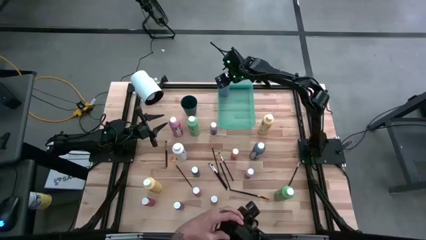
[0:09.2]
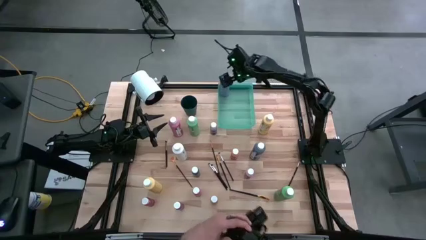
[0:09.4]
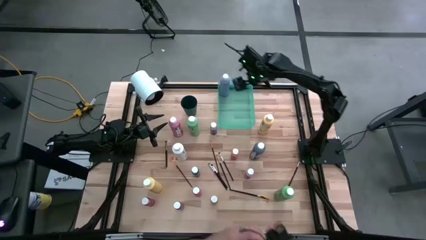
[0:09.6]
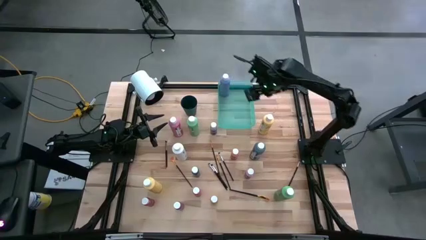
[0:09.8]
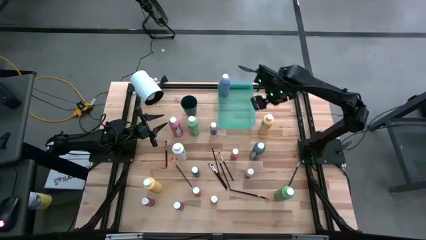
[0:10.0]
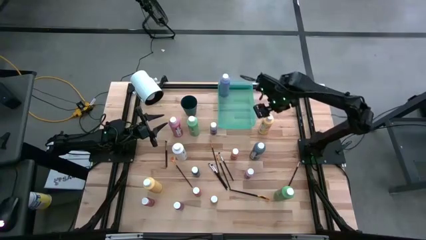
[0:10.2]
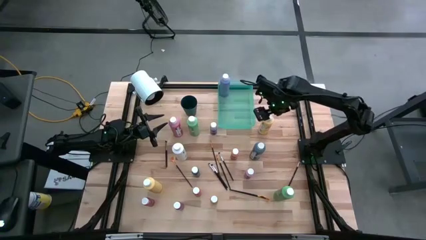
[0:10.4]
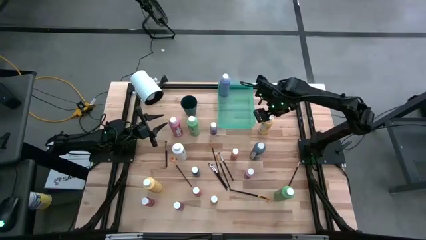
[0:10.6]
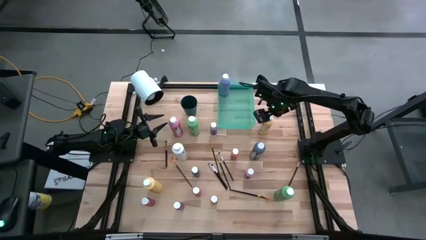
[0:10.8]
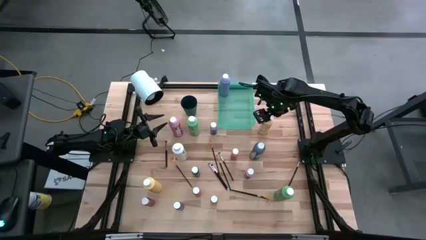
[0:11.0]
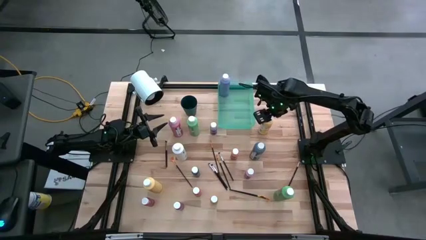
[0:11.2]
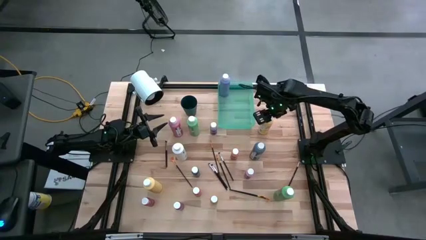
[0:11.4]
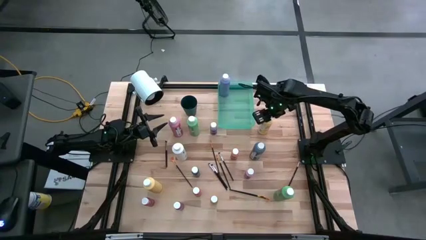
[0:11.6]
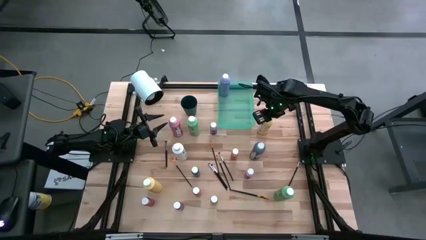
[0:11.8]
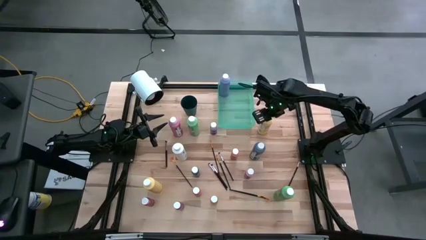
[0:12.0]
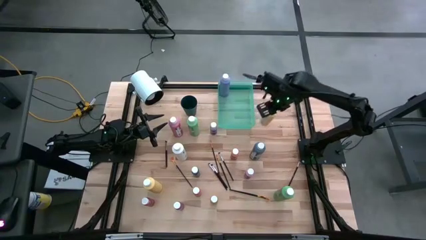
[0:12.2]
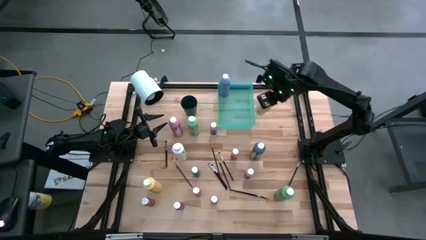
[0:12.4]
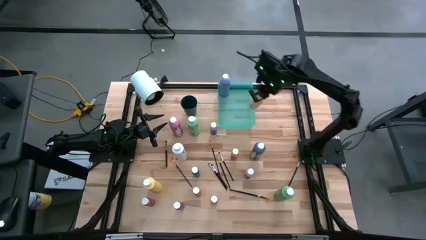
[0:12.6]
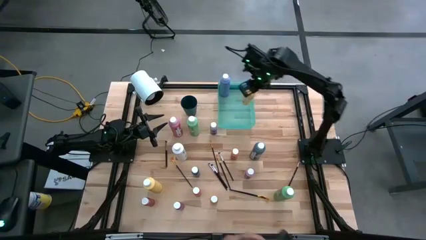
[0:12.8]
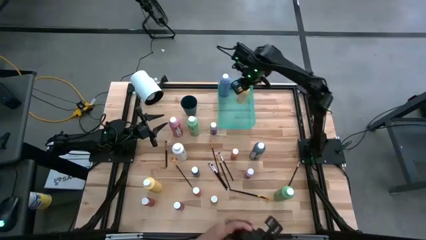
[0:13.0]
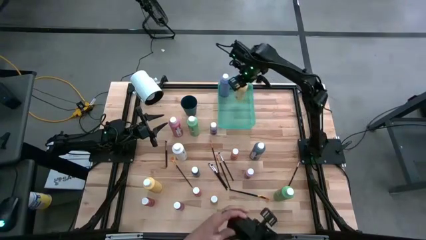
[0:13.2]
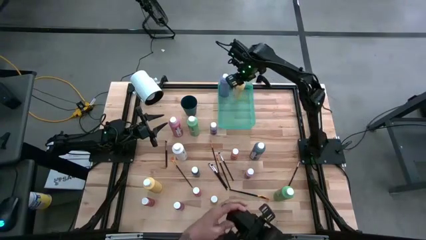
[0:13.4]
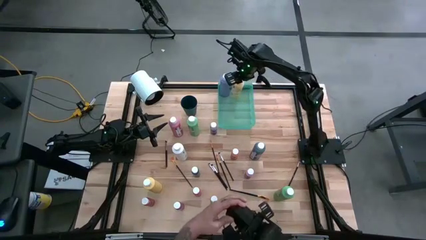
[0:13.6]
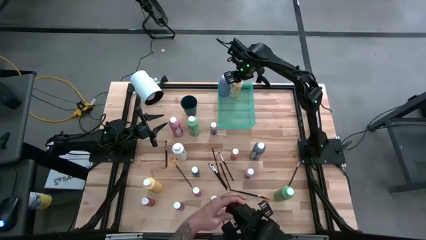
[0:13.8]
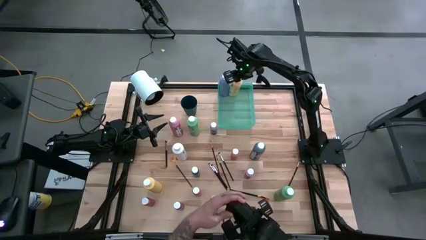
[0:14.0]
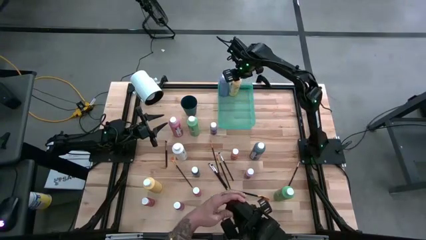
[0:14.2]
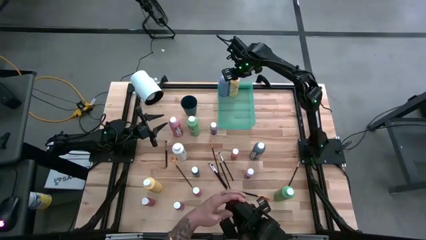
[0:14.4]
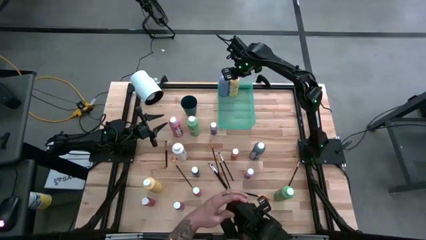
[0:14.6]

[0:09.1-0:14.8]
Task: Pick & Place Paint Supplies
Put the top yellow big paint bottle into the green bin

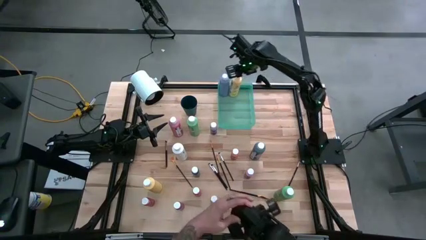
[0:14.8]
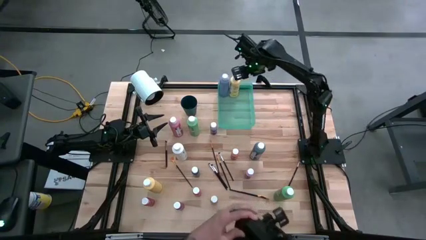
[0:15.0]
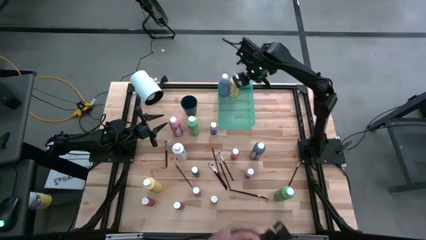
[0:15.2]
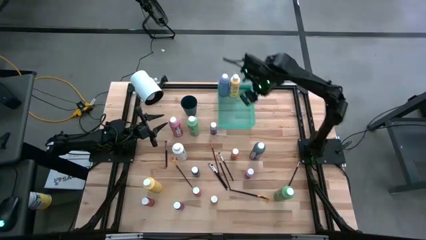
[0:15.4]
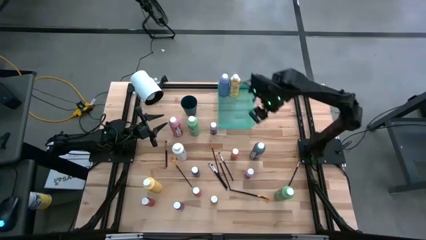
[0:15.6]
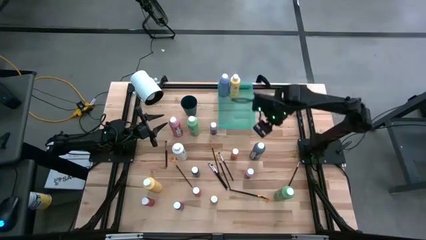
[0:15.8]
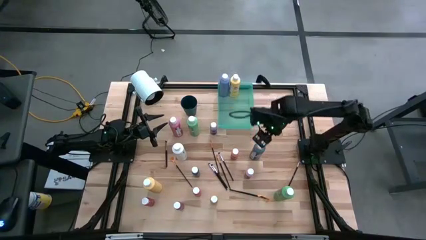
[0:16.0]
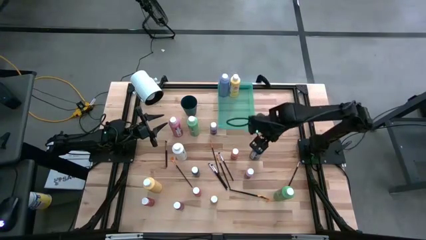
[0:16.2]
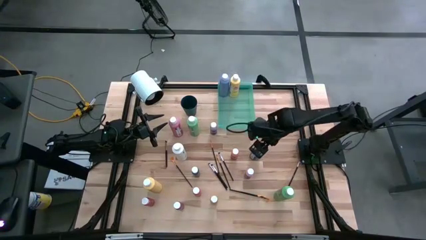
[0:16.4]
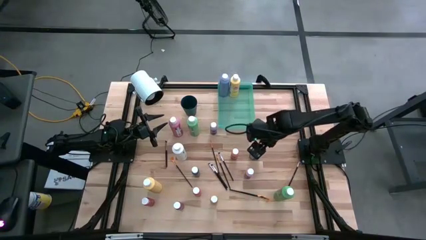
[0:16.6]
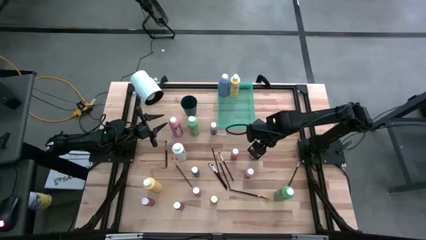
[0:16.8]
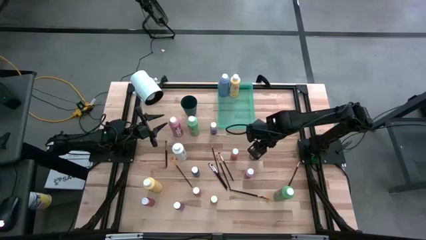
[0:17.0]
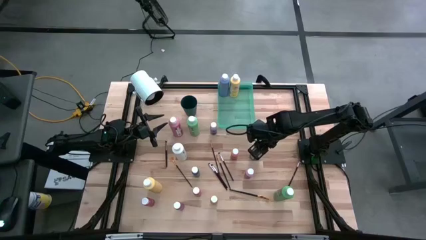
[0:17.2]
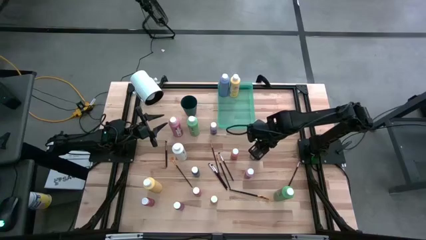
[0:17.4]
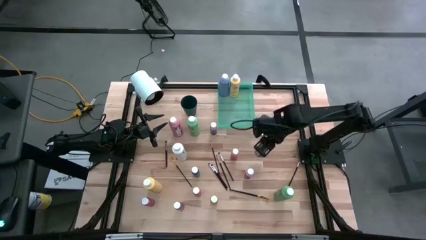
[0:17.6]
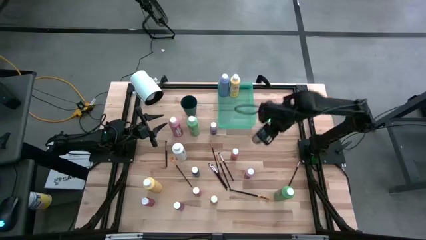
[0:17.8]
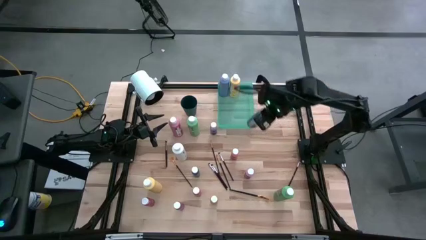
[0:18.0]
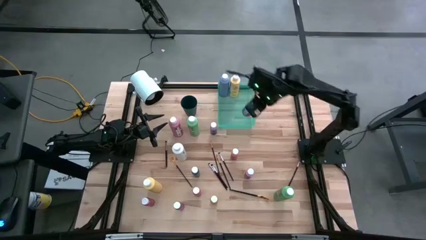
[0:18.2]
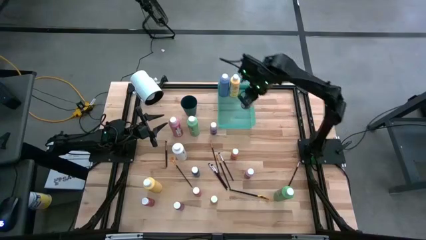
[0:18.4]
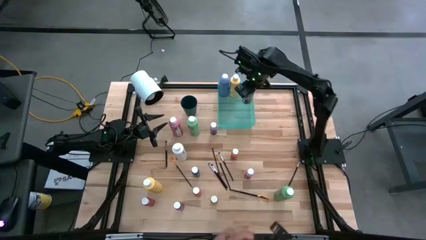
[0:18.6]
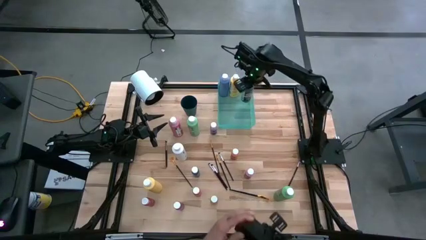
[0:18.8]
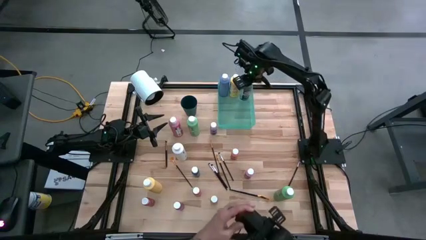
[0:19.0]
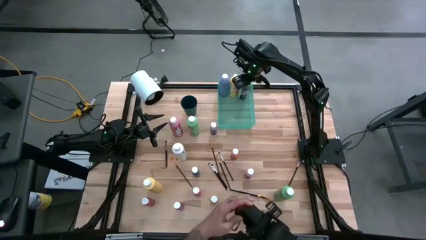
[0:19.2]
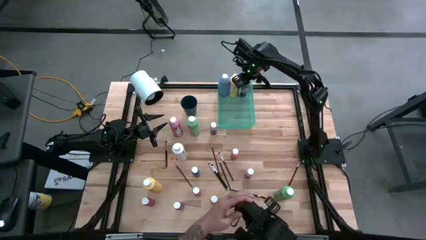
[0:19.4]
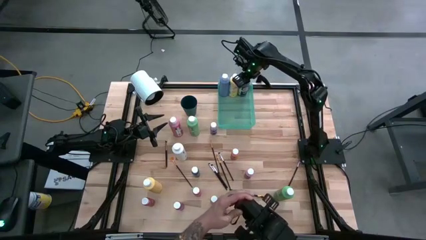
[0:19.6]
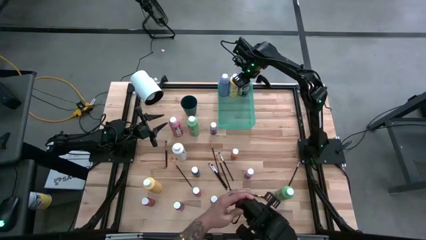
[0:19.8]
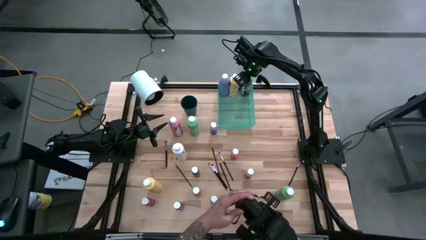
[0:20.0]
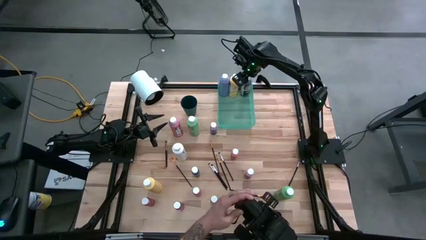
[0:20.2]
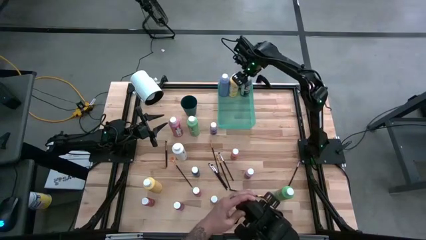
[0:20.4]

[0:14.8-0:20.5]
Put the blue big paint bottle into the green bin

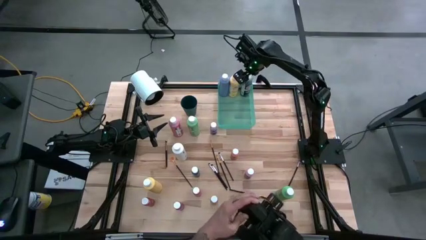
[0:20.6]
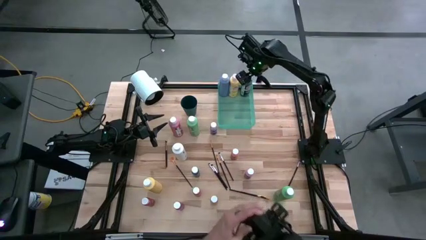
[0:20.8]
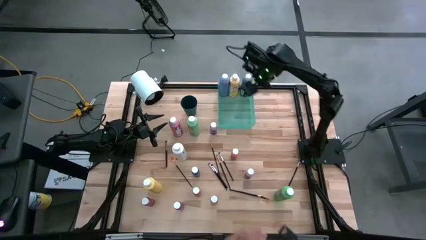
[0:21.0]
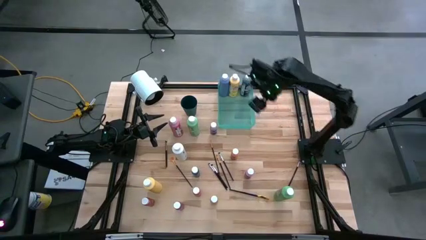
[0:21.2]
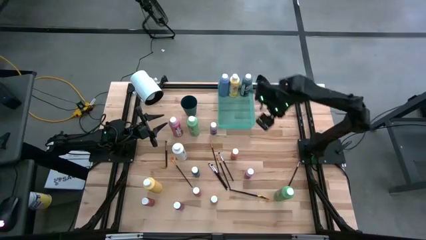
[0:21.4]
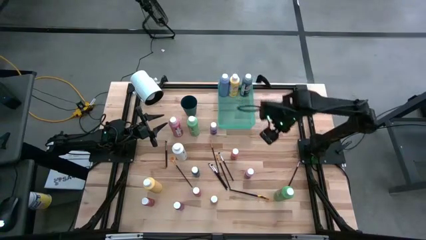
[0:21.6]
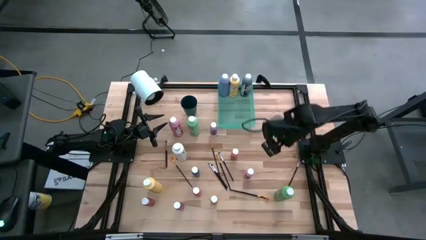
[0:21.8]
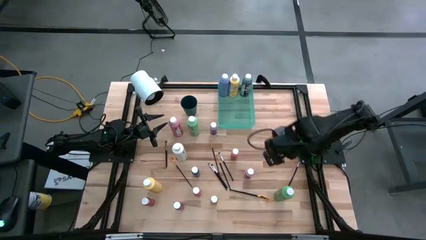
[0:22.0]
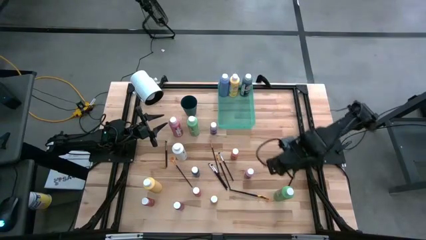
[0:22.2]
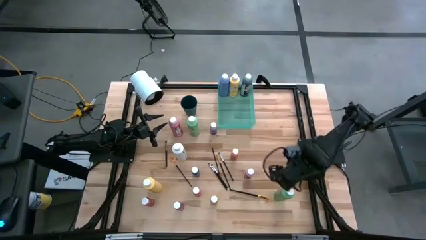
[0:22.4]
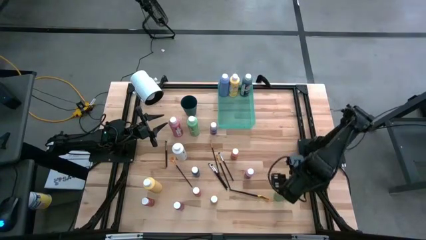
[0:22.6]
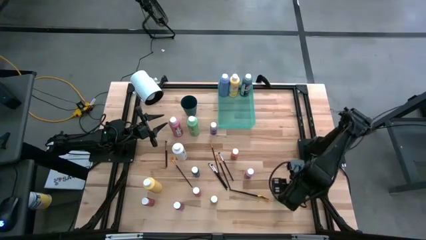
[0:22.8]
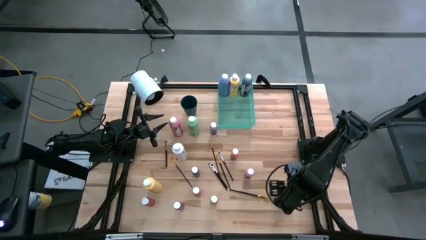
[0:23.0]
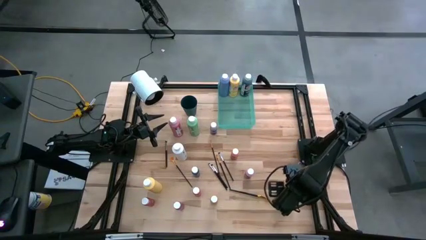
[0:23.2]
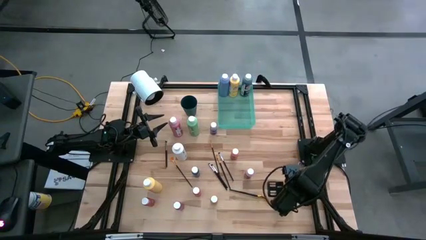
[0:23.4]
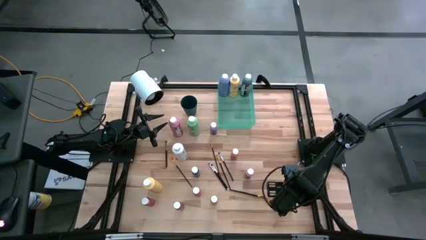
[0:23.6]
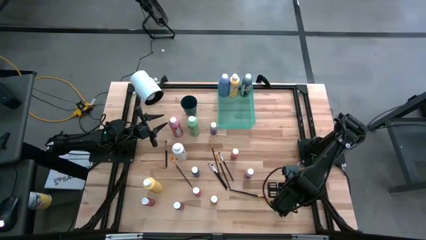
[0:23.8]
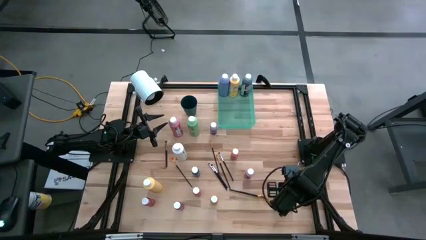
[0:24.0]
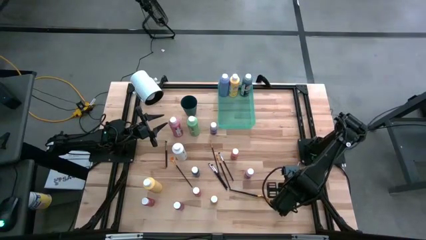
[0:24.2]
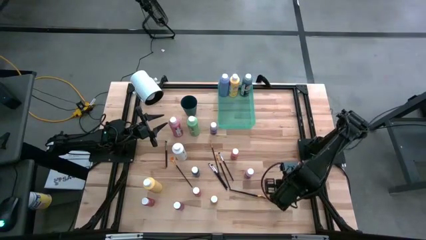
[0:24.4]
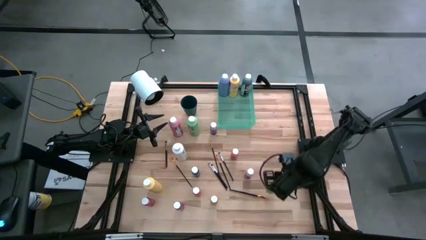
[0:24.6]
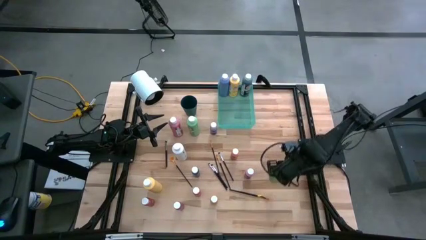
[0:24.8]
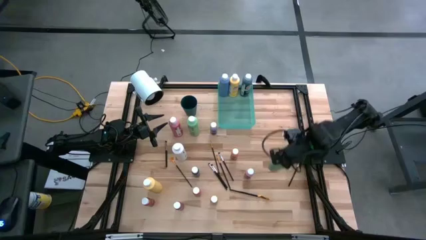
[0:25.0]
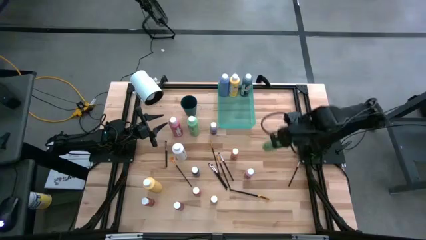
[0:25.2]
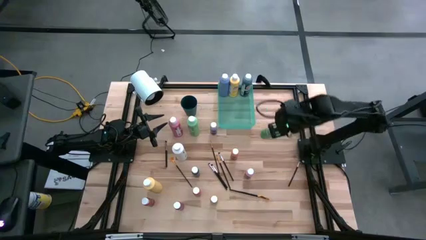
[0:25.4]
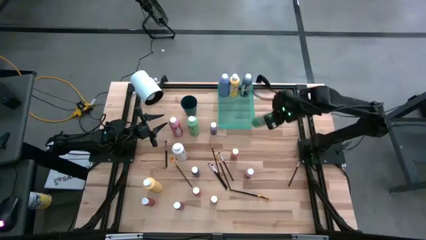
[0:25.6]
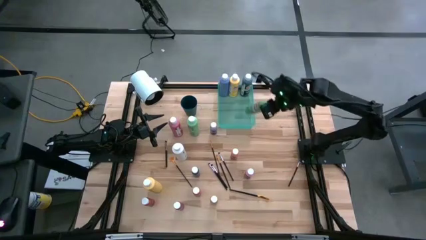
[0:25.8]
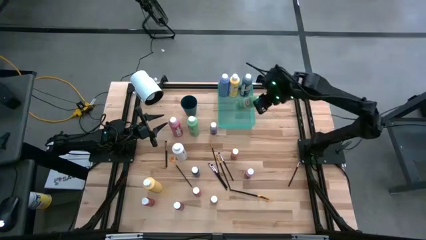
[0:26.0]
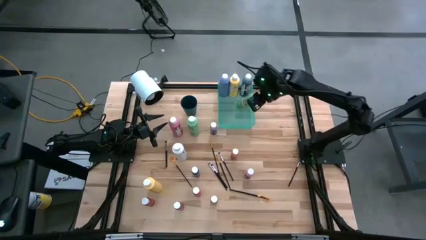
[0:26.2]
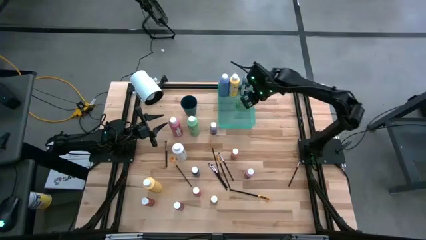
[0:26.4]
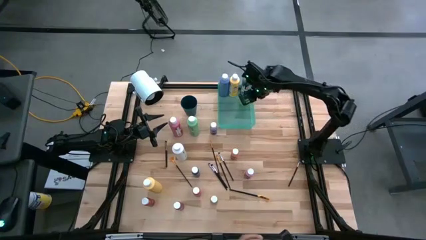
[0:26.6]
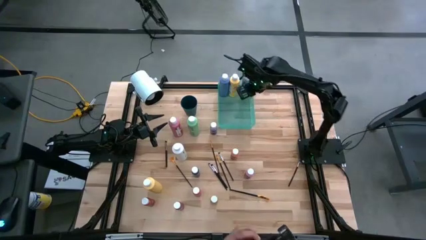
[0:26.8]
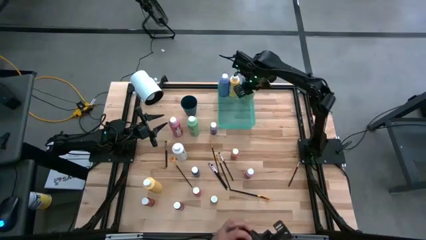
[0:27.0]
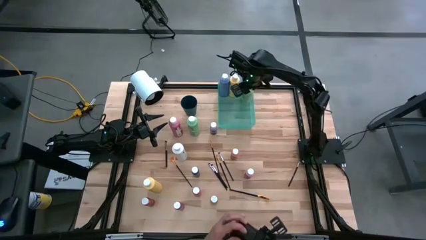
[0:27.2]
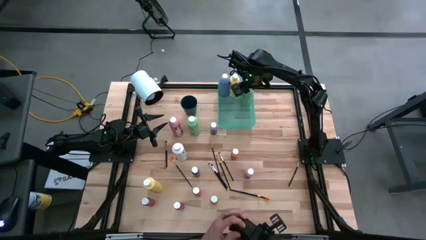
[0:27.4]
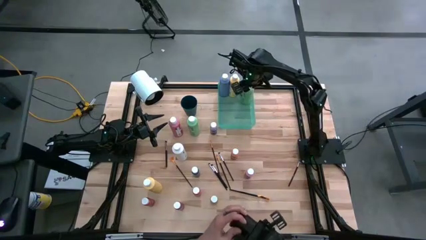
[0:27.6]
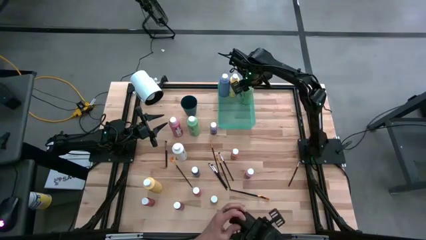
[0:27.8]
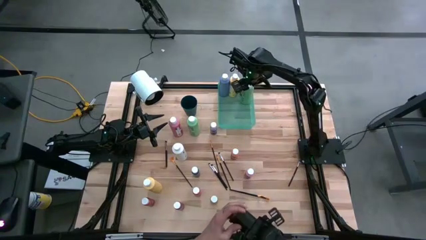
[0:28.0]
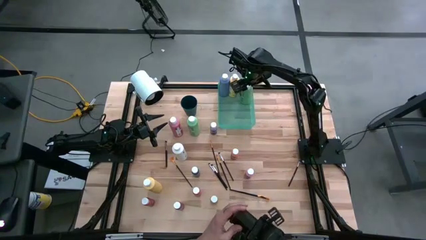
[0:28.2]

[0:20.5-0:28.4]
Put the bottom green big paint bottle into the green bin
